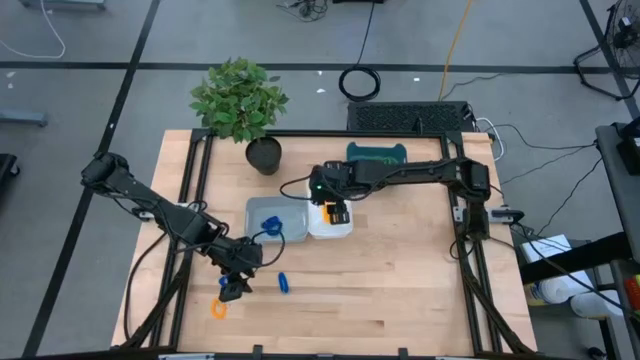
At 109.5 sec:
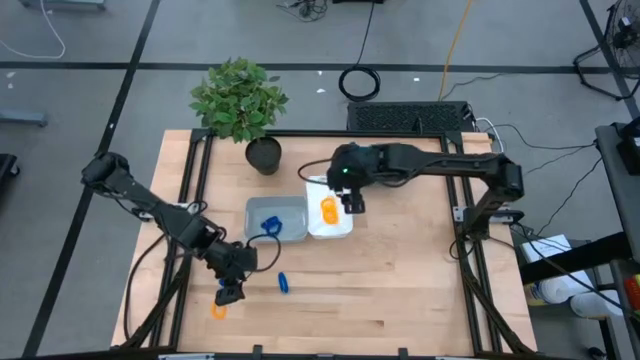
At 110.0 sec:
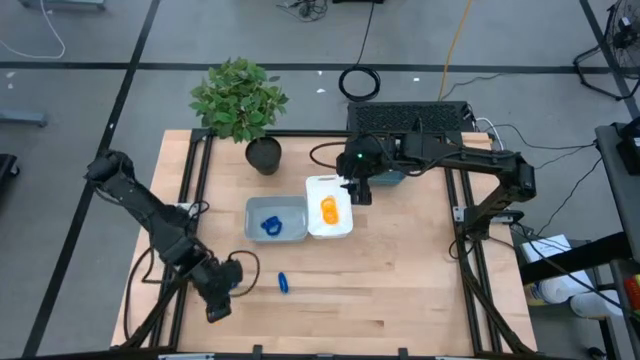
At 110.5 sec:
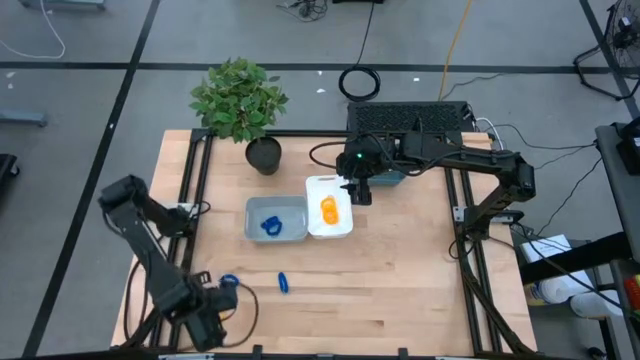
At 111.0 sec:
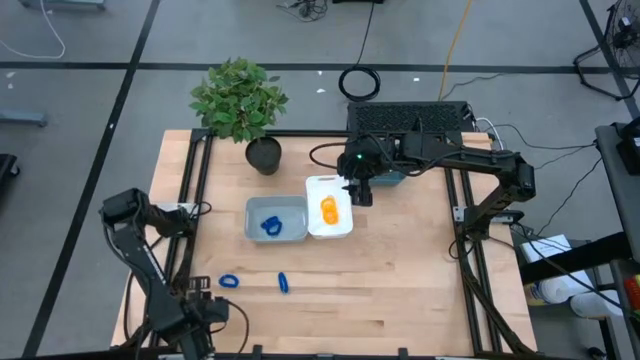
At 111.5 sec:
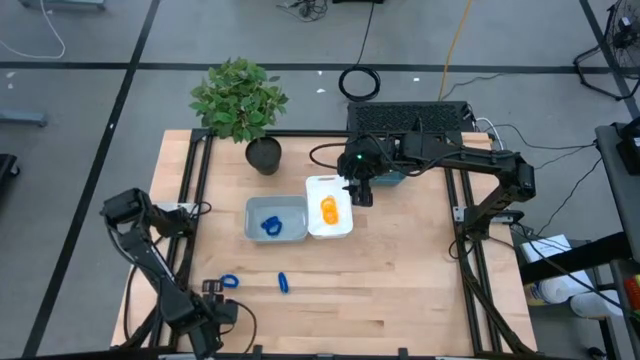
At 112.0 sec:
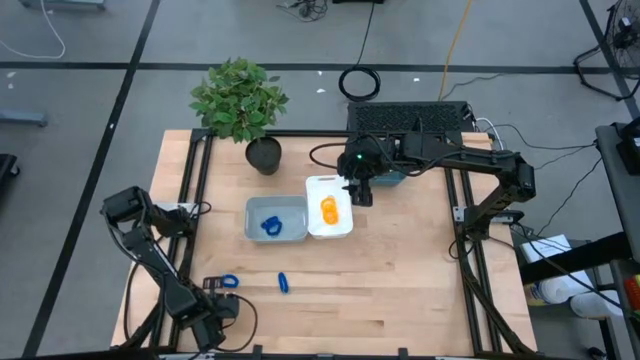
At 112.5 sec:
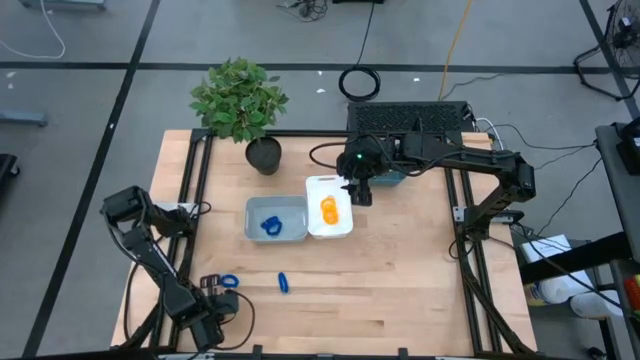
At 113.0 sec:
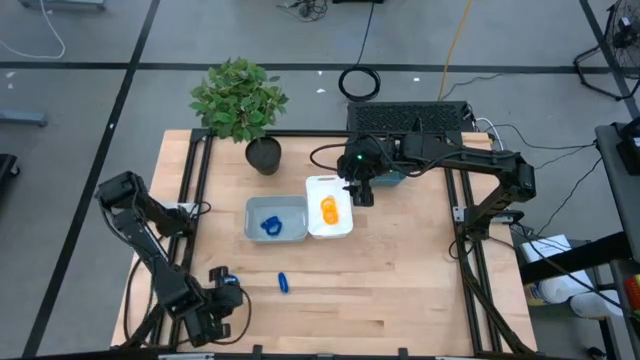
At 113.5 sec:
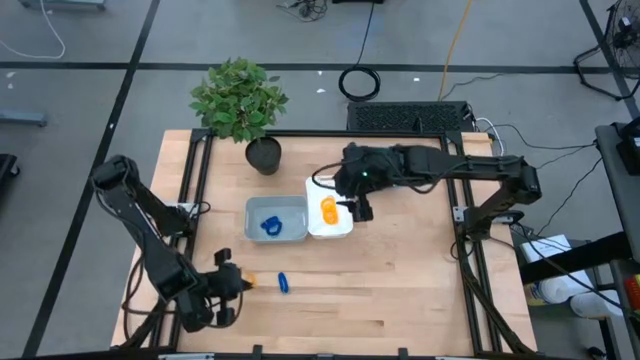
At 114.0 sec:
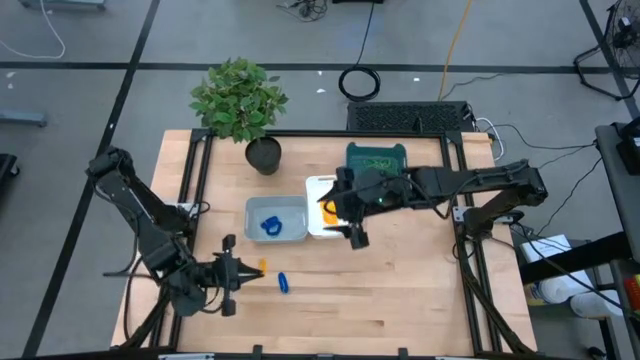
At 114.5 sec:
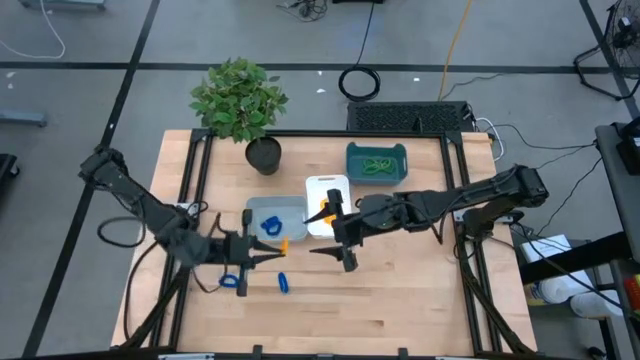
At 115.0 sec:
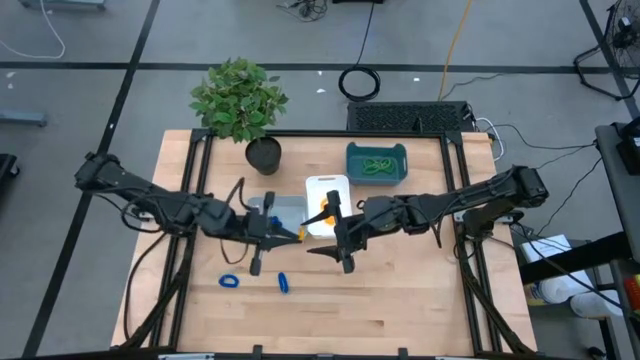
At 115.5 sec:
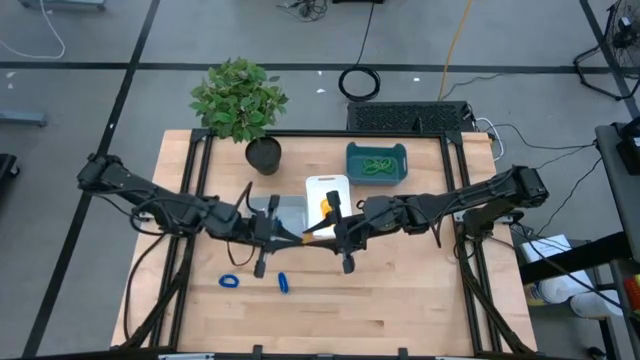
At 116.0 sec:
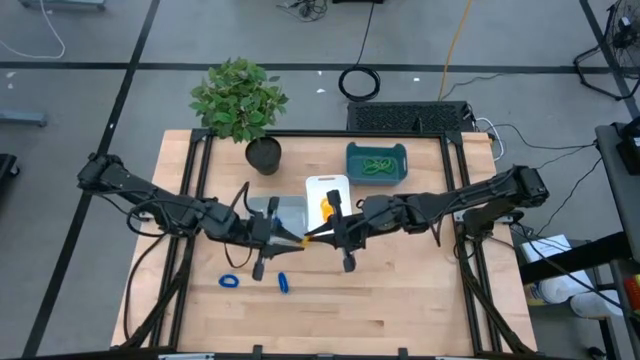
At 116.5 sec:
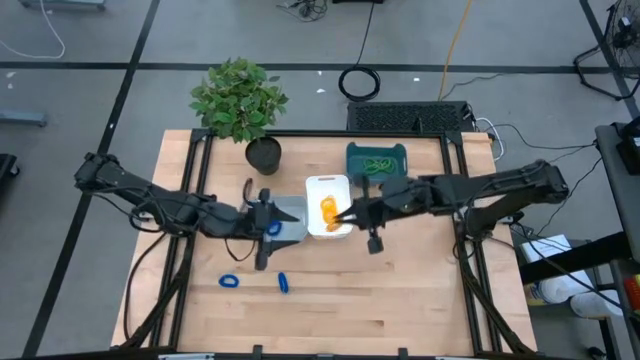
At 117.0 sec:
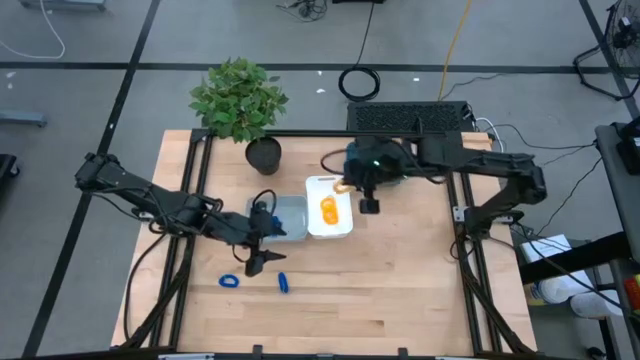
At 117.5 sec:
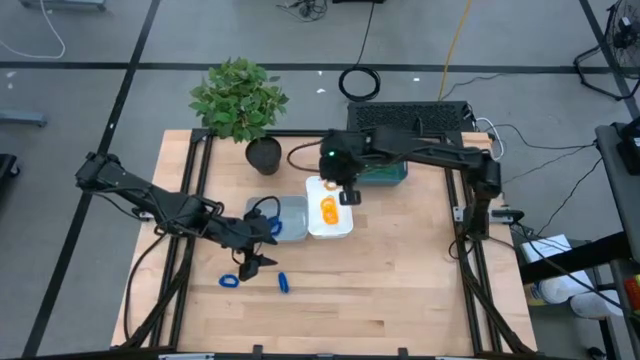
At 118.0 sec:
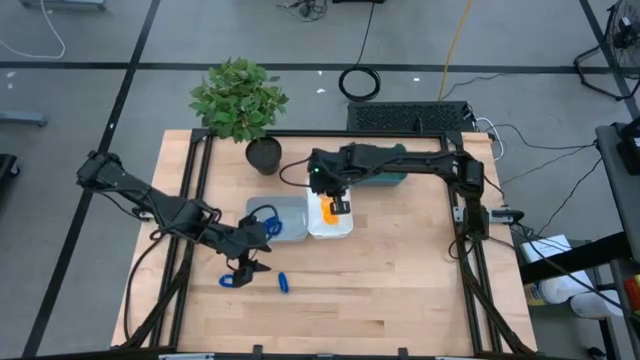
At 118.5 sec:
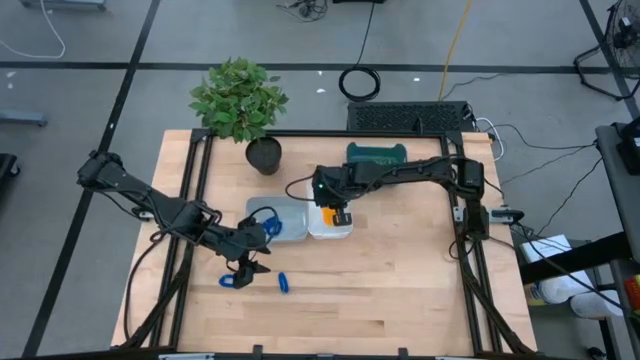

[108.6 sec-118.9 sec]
Task: Sort spring keychains
Put the yellow spring keychain into the white bin

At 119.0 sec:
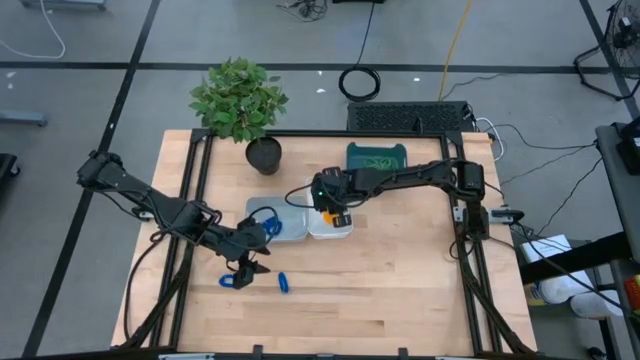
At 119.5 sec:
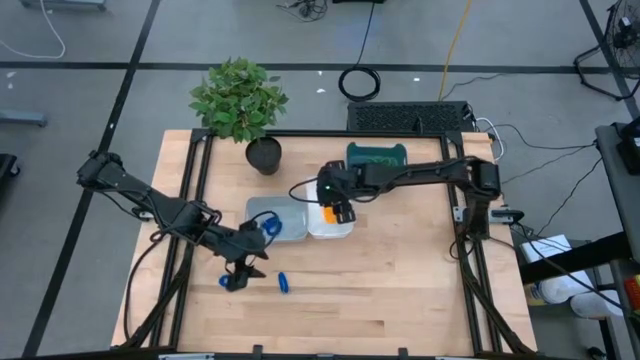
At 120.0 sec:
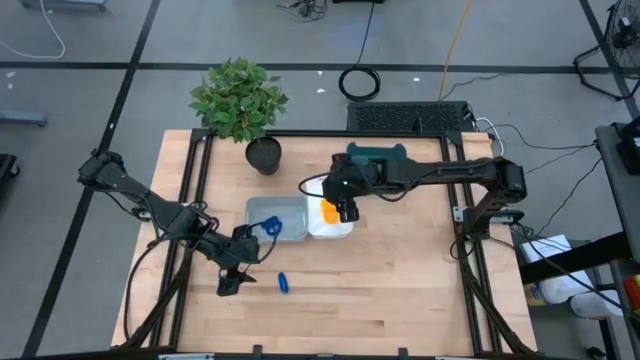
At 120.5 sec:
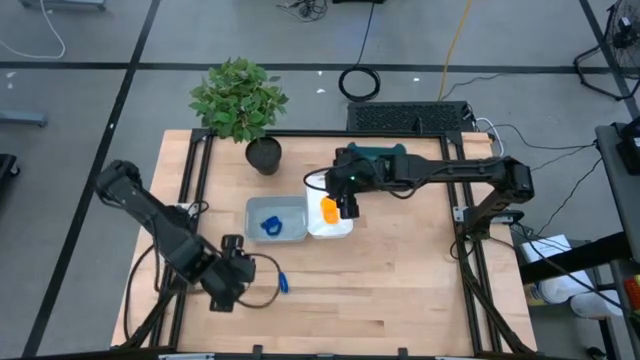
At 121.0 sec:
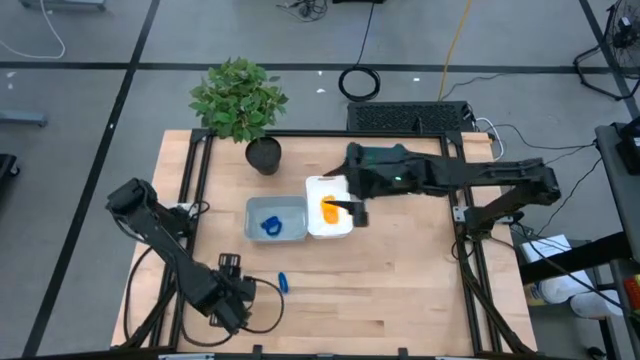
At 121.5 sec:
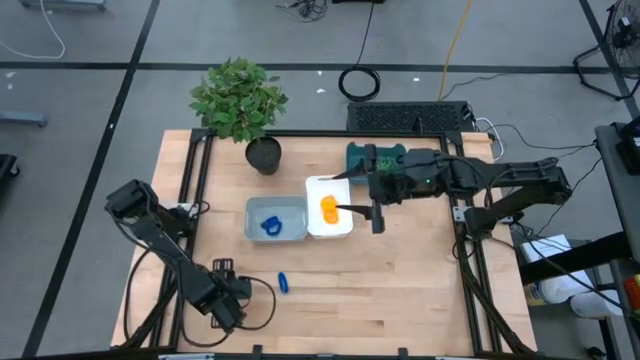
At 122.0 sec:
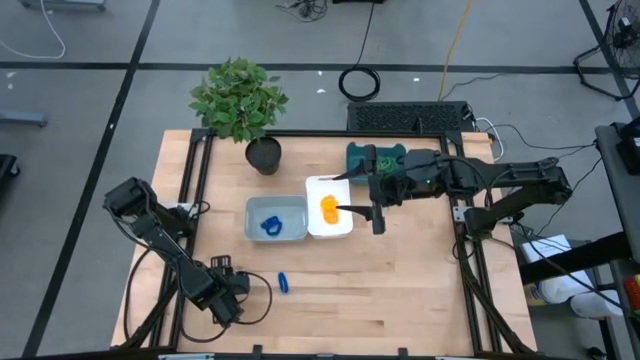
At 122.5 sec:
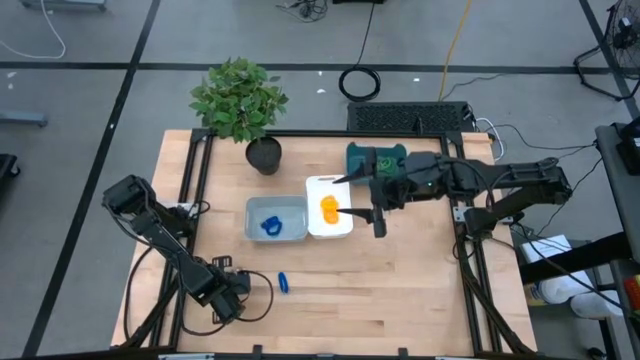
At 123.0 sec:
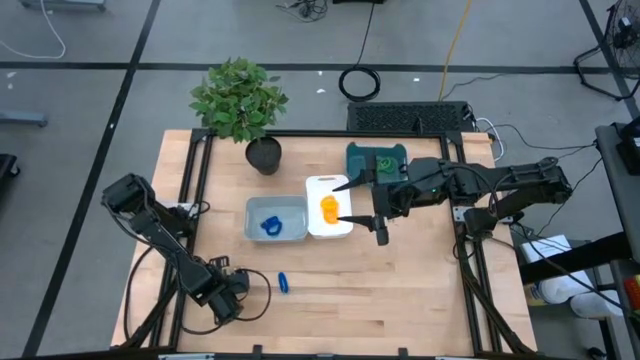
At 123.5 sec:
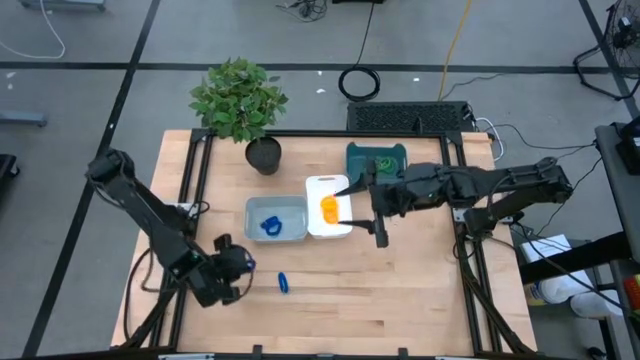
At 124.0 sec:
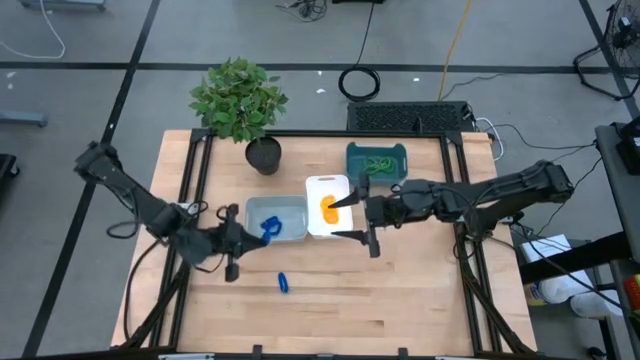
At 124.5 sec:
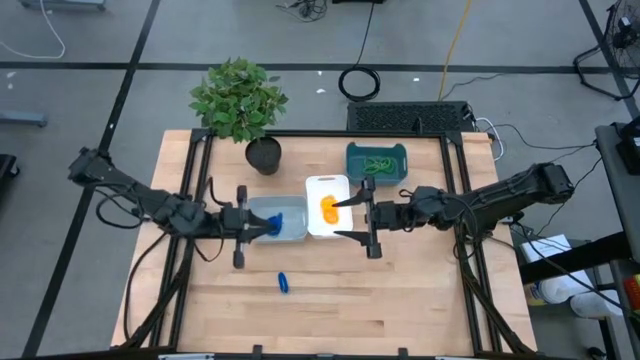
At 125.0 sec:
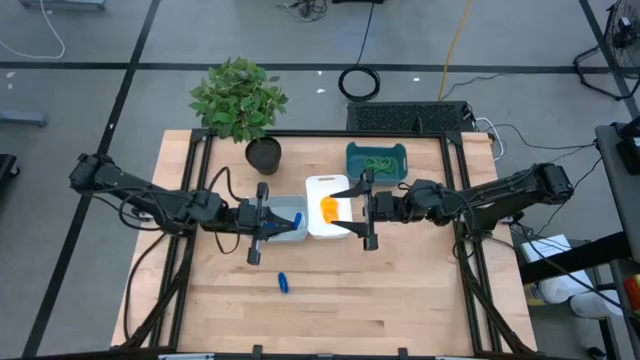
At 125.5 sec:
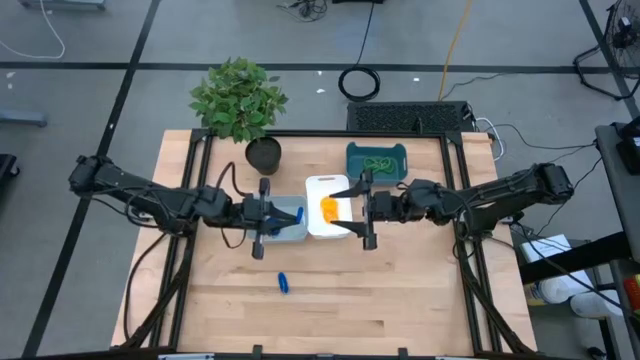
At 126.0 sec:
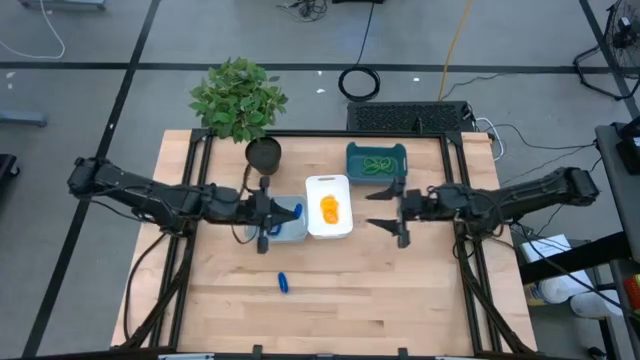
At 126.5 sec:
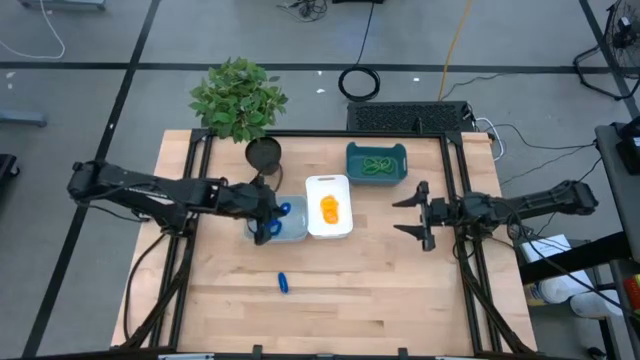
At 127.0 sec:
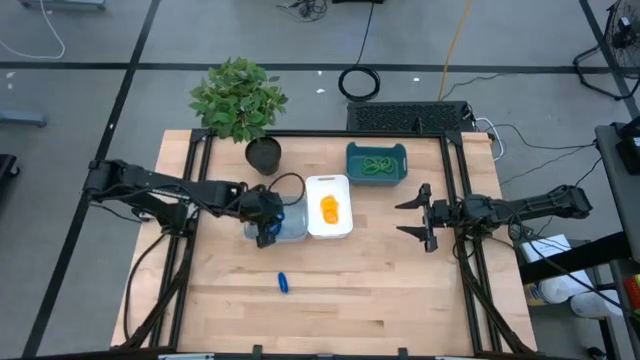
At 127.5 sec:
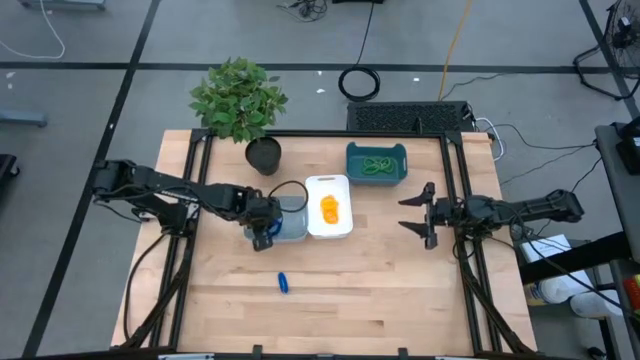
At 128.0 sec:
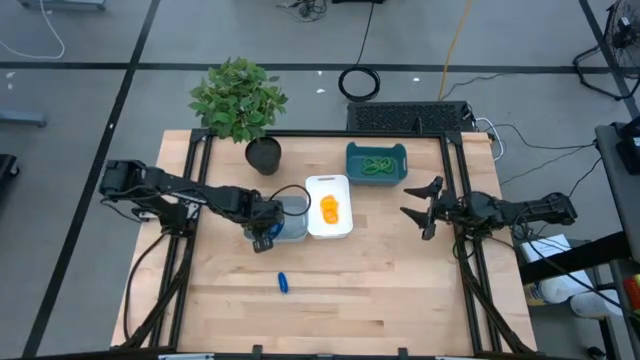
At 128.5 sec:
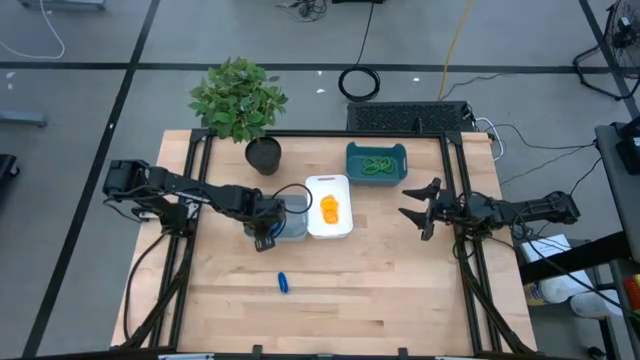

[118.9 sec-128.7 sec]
Put the blue spring keychain into the gray bin
